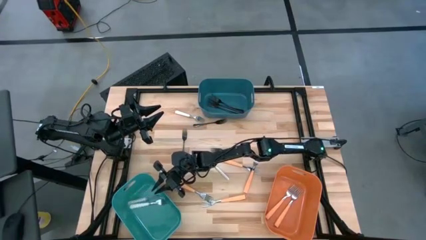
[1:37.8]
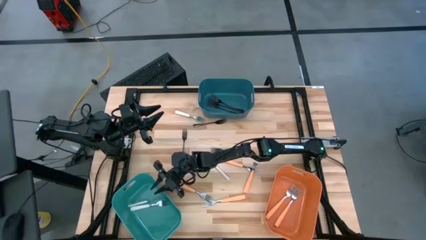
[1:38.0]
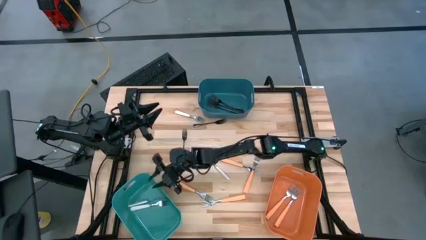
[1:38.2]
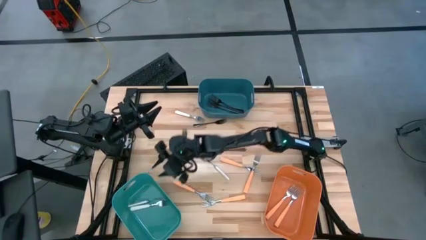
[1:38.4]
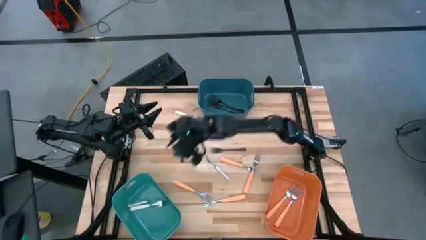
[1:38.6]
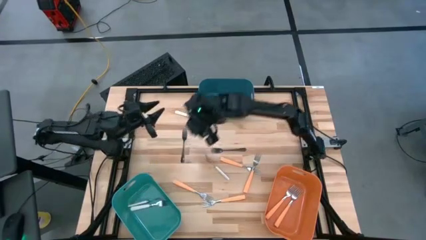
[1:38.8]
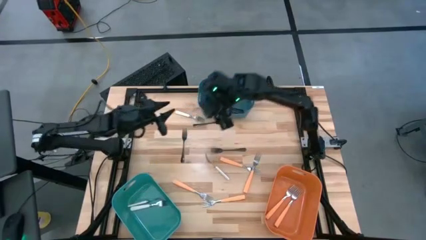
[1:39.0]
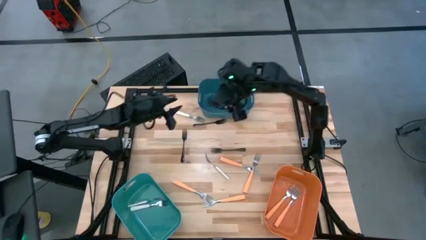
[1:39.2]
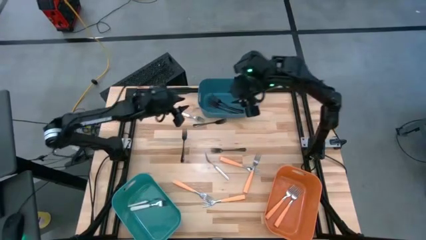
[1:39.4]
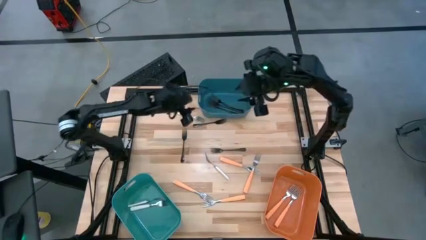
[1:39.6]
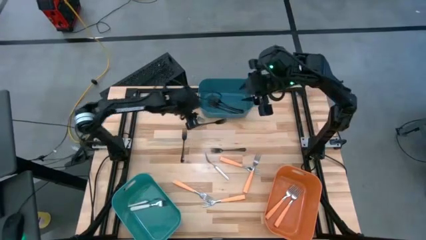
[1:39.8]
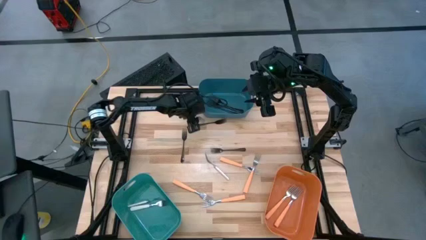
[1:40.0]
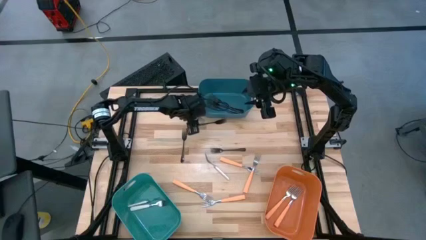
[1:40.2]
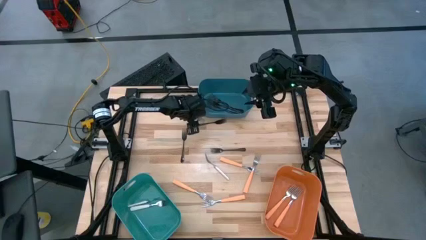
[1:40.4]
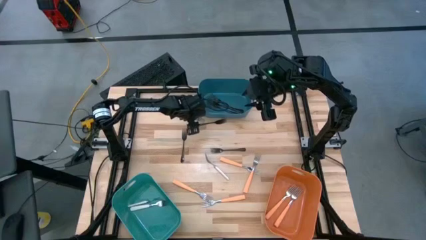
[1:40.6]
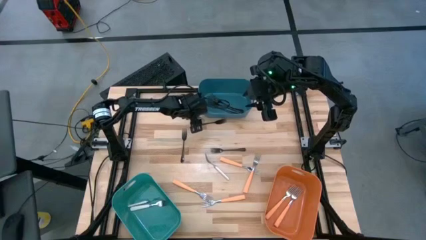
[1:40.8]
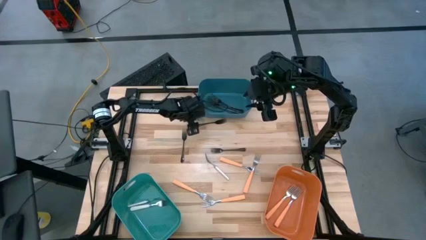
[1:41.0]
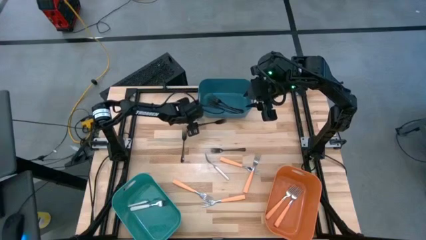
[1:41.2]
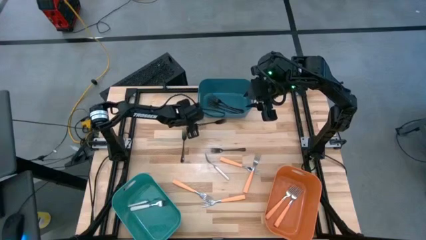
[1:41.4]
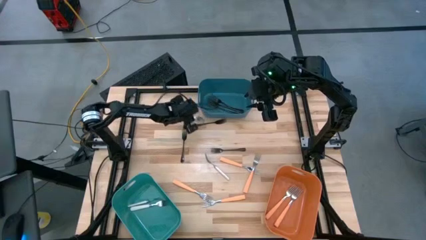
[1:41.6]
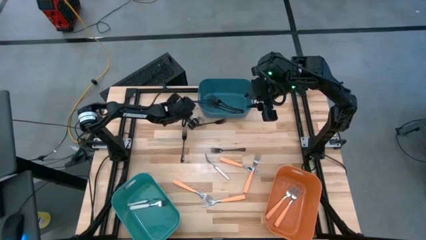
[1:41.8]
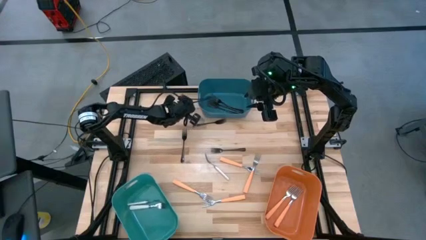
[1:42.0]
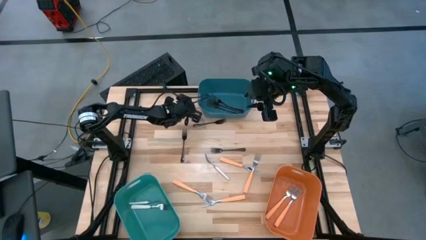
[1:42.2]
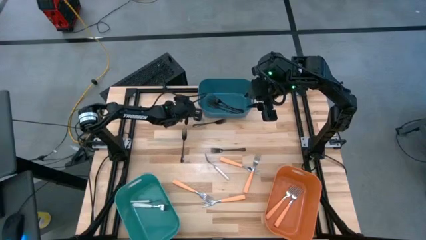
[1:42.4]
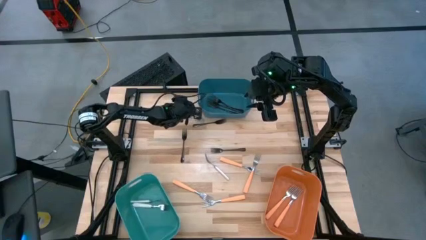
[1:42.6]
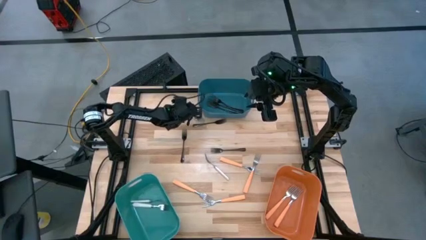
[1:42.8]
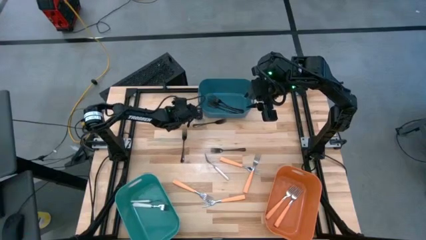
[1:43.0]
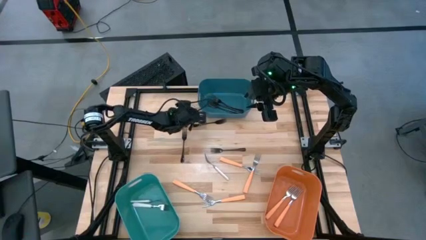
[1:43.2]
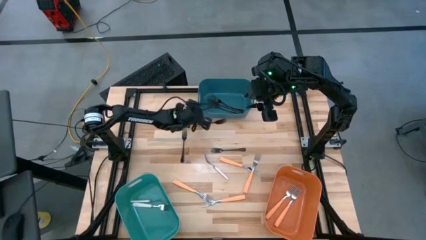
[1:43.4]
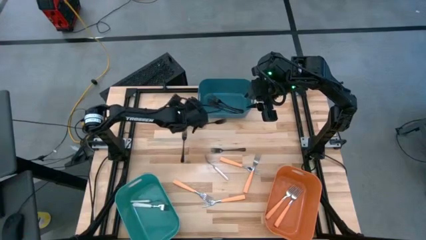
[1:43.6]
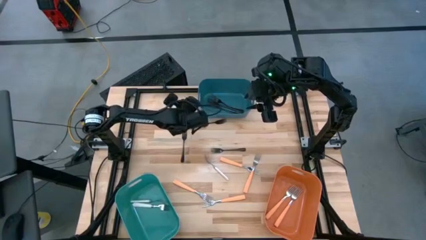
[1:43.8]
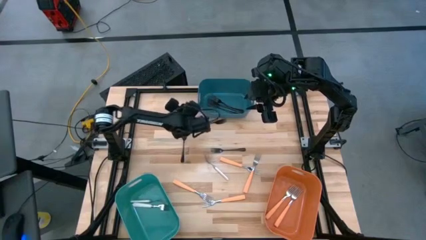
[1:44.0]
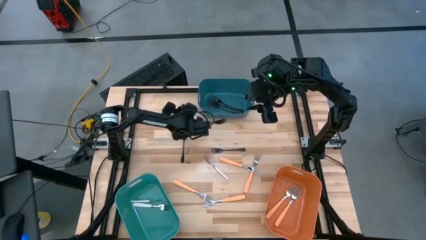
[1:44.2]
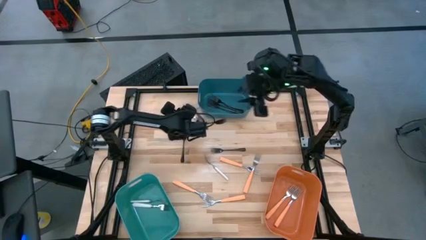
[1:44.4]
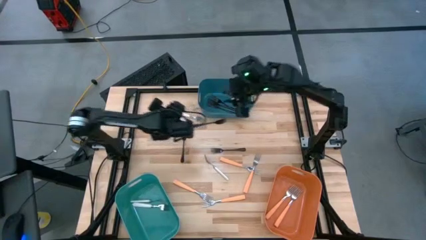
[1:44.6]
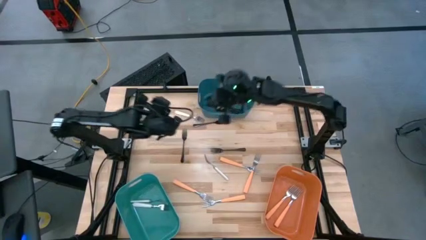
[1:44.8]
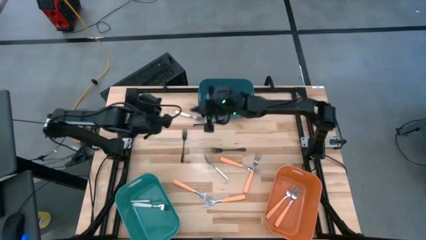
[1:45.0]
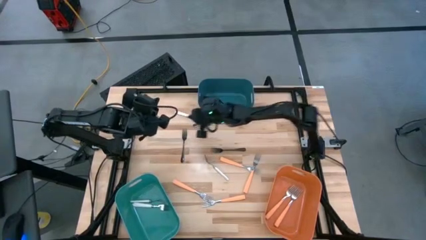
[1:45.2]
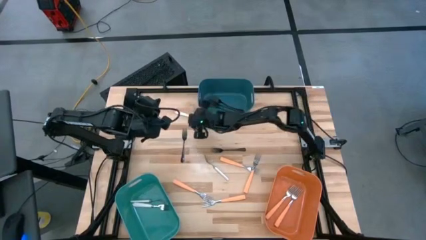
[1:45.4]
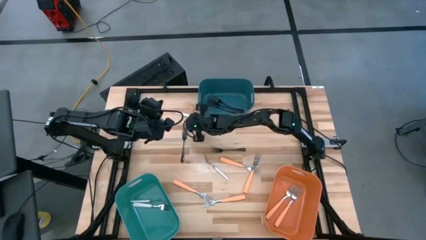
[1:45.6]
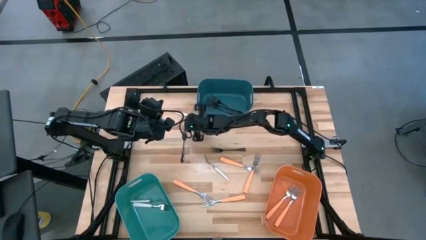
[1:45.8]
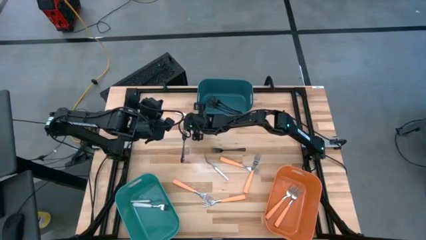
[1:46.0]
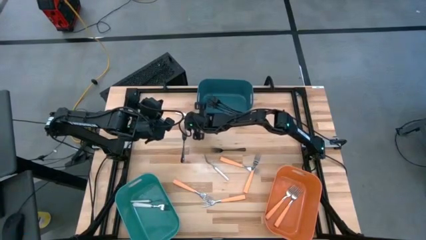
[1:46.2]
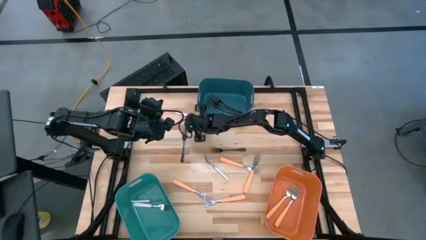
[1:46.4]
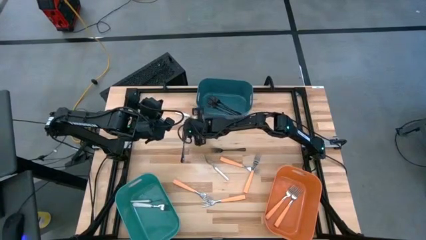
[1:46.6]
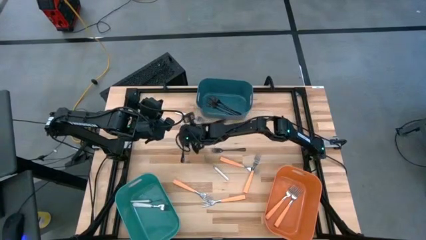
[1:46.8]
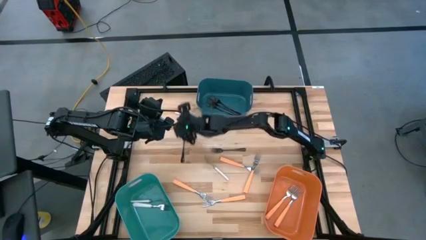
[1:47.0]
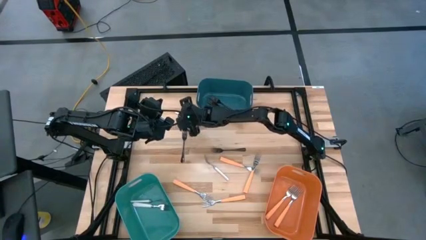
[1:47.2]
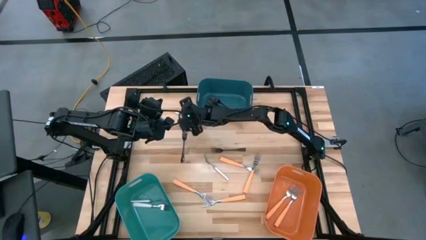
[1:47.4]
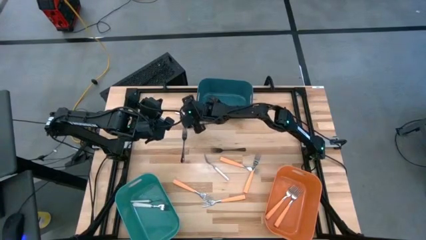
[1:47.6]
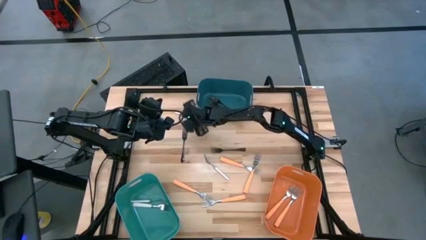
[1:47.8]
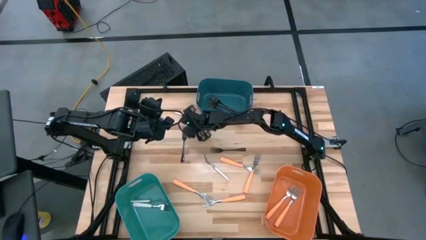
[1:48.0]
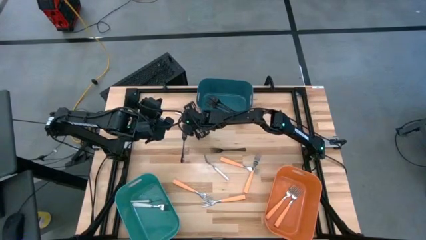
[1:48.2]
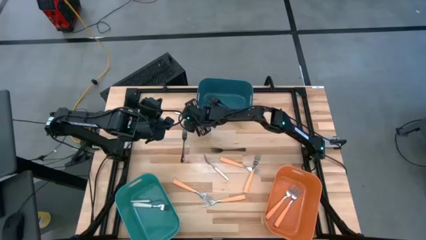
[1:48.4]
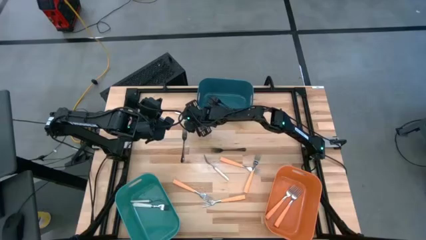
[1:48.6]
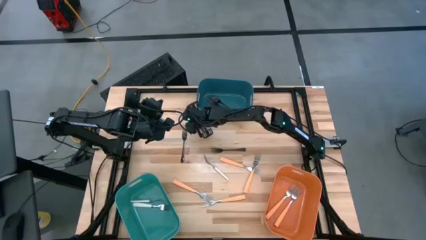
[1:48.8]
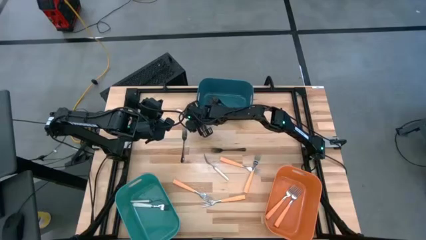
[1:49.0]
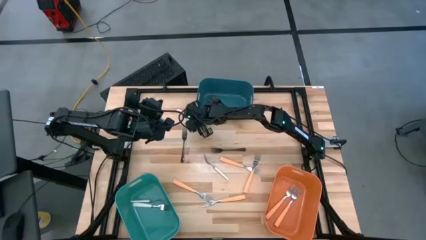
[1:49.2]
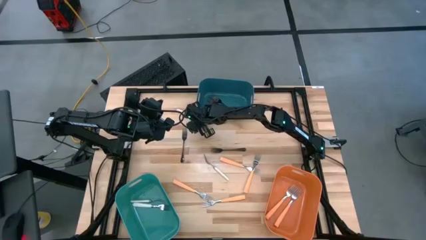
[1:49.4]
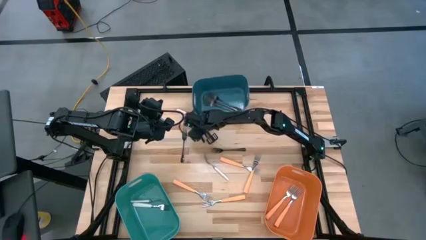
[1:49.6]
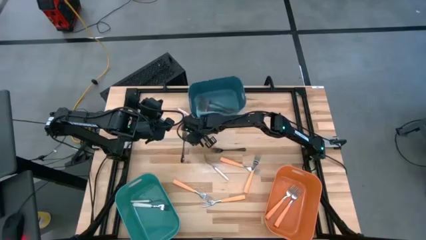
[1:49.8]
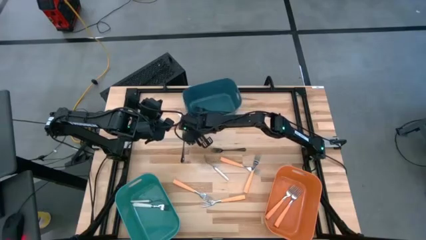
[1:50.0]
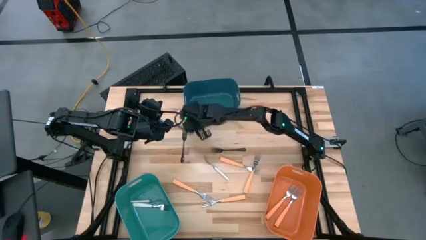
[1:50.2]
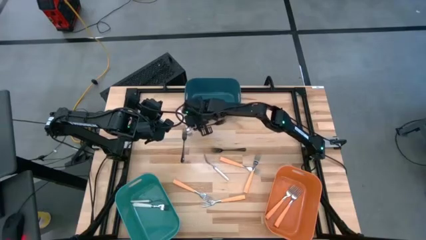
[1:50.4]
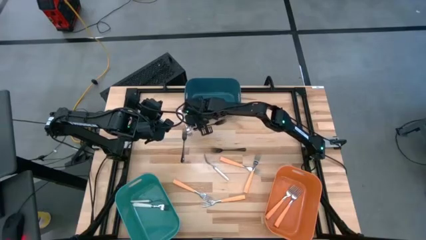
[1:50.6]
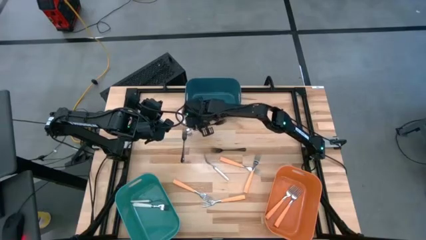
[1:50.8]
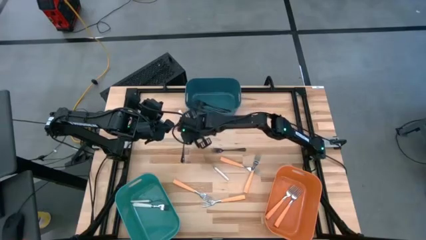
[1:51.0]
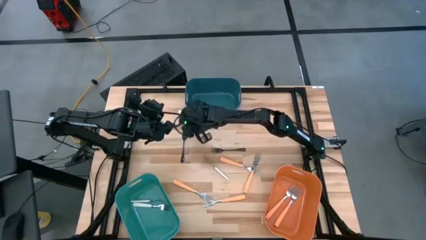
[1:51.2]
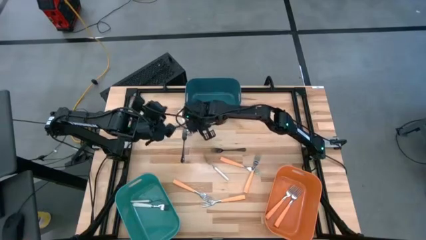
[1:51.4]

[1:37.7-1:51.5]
Task: Sort silverware by color (type)
Put the white fork into the green blue bin

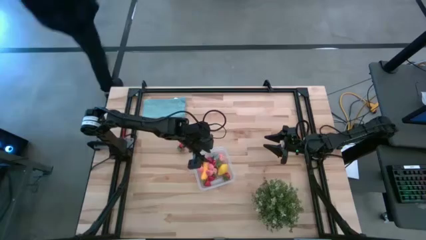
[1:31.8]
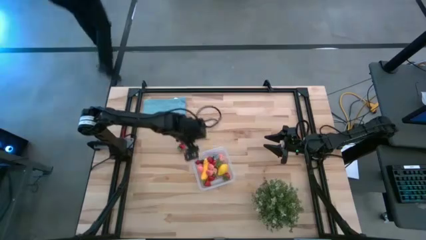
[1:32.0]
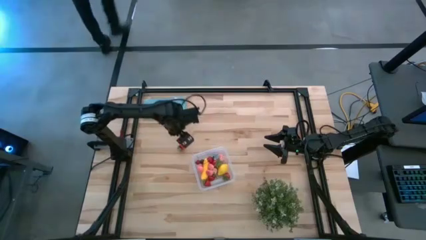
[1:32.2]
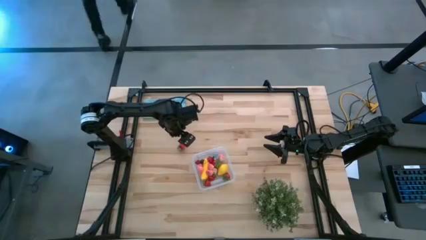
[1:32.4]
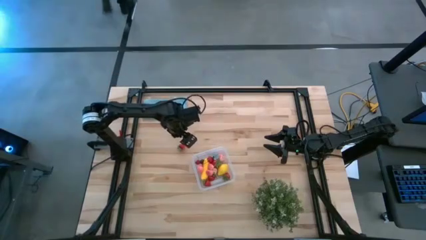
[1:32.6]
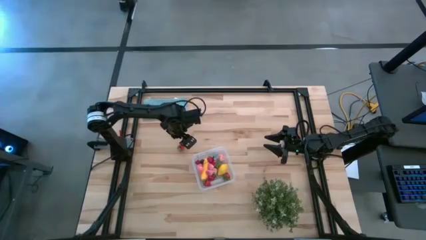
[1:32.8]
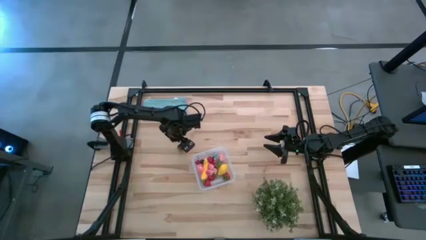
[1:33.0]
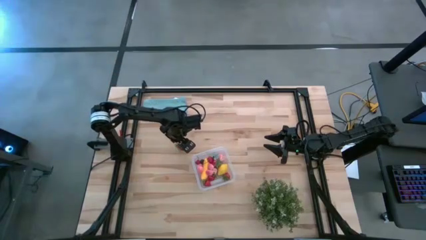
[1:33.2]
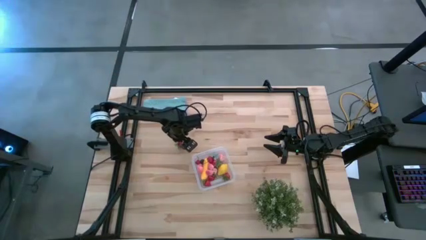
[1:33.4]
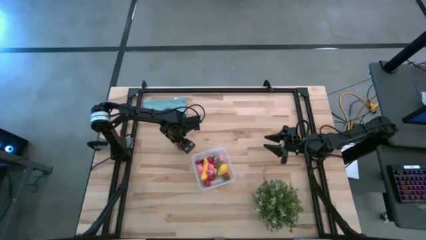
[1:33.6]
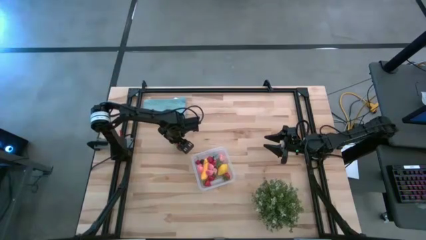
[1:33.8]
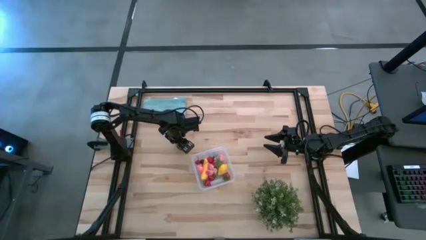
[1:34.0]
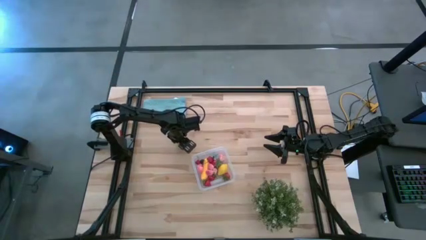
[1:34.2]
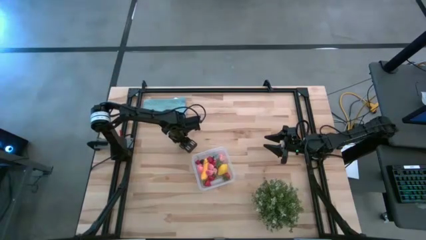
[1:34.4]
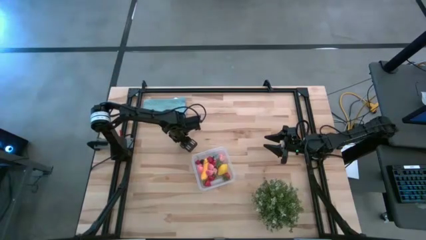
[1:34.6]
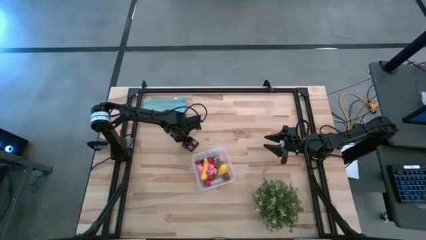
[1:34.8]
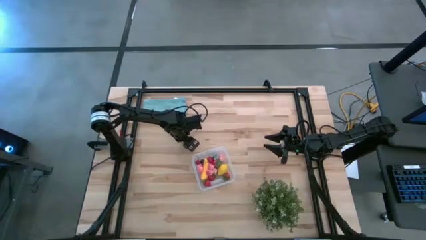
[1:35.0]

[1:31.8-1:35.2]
Task: Pick and placing Produce into tupperware
Put the red strawberry into the transparent bin

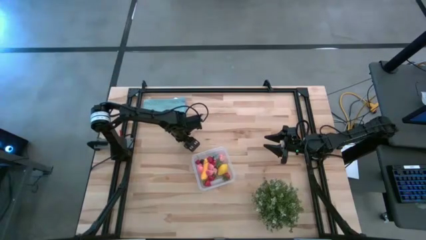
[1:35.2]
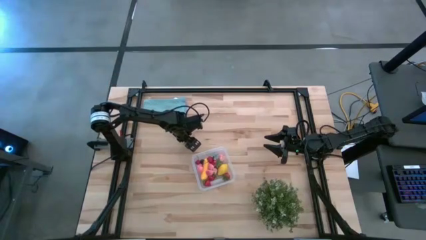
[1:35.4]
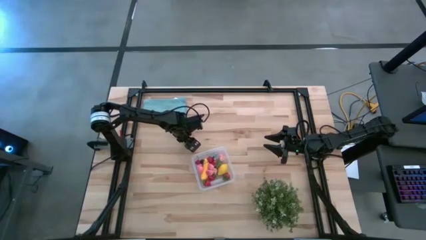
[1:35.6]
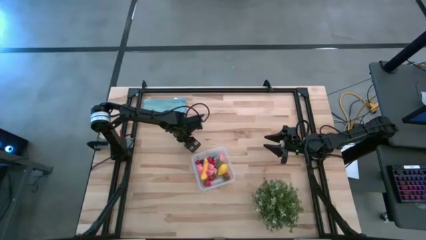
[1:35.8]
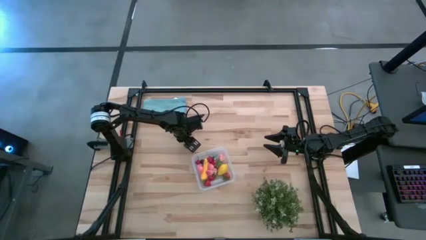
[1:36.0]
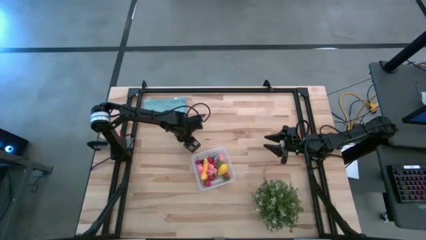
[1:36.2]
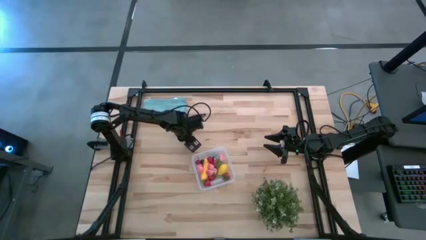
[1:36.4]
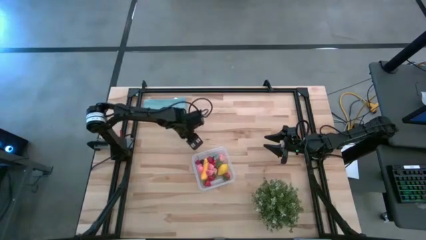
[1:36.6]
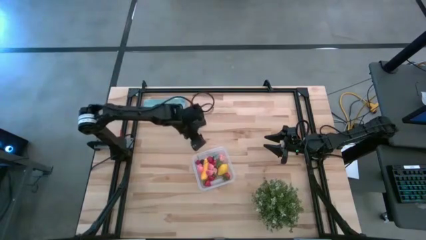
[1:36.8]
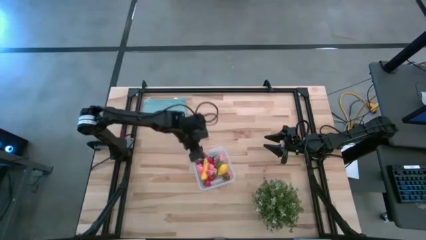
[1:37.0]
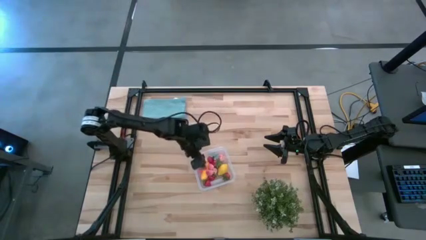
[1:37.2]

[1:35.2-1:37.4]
Put the red strawberry into the transparent bin
